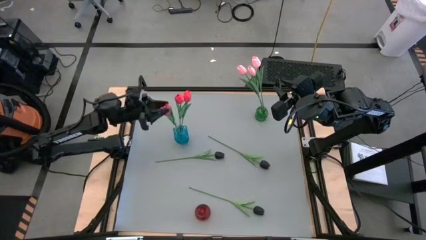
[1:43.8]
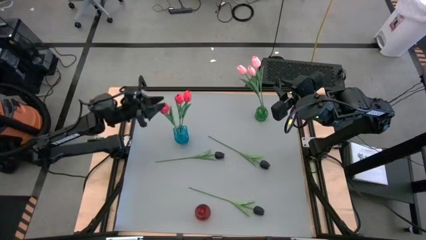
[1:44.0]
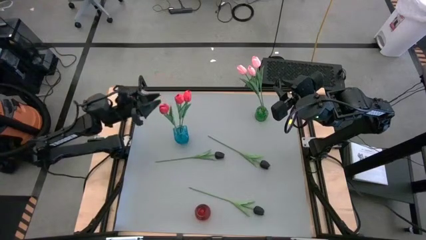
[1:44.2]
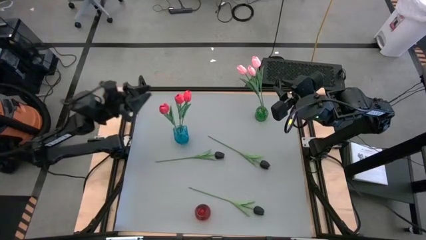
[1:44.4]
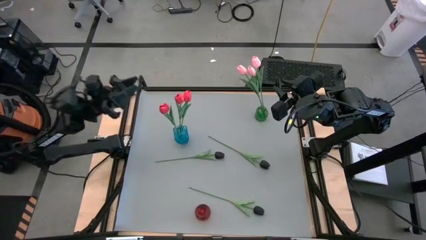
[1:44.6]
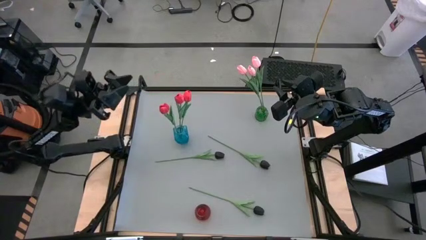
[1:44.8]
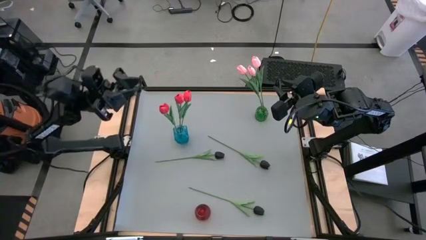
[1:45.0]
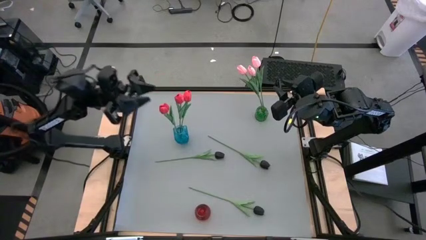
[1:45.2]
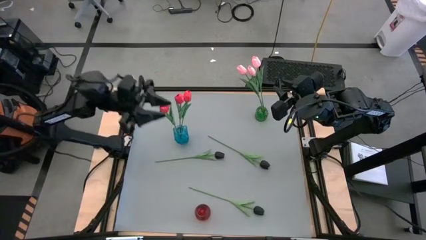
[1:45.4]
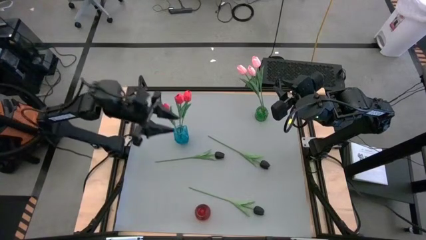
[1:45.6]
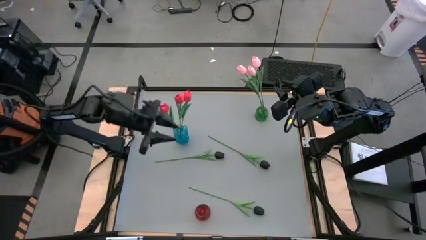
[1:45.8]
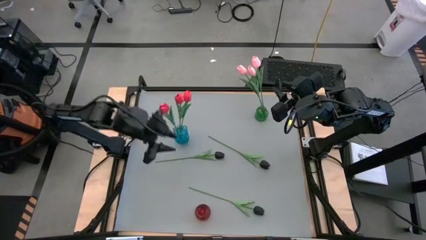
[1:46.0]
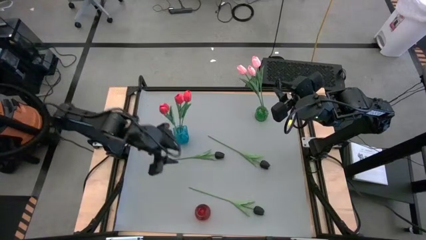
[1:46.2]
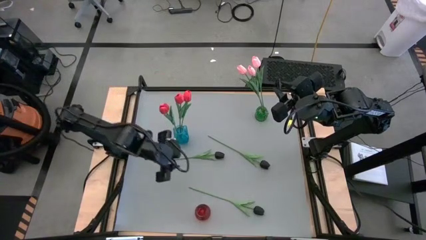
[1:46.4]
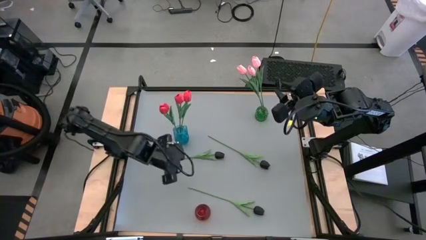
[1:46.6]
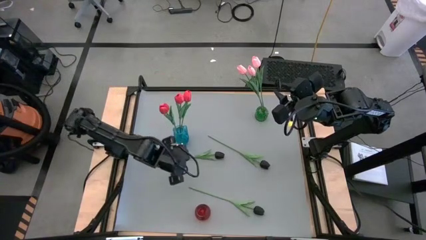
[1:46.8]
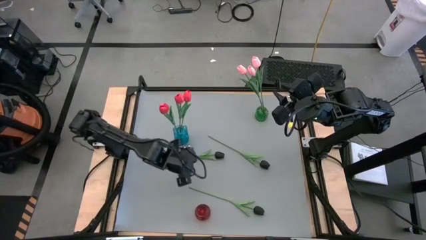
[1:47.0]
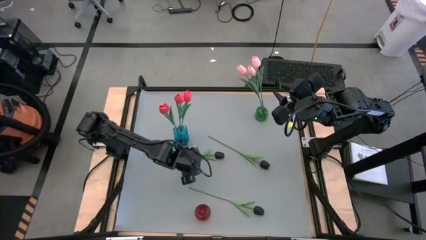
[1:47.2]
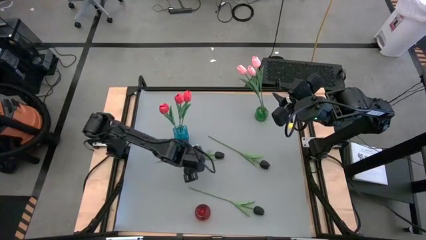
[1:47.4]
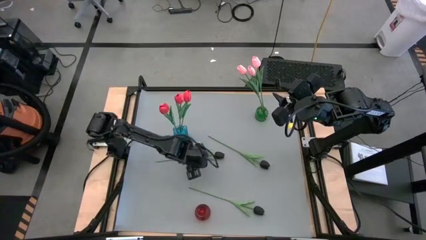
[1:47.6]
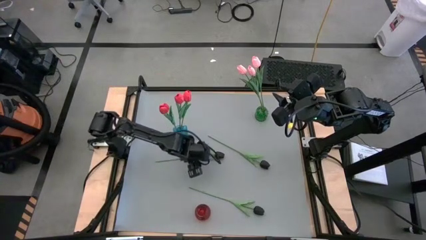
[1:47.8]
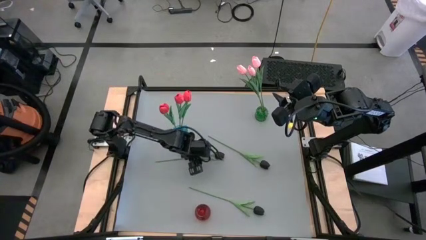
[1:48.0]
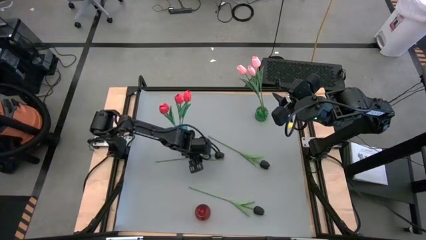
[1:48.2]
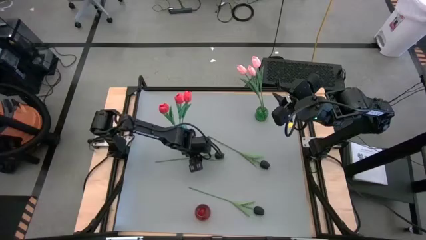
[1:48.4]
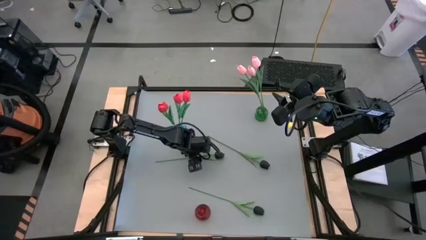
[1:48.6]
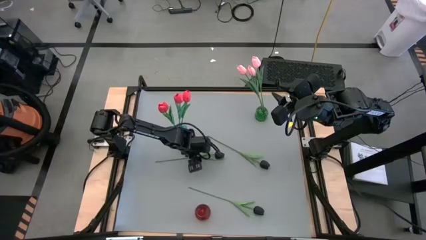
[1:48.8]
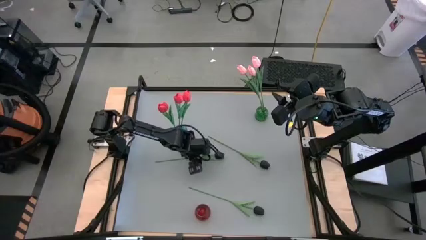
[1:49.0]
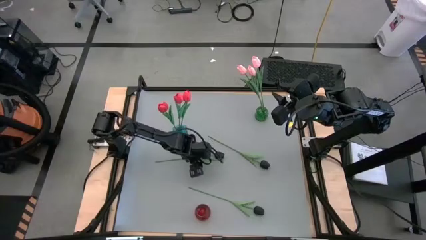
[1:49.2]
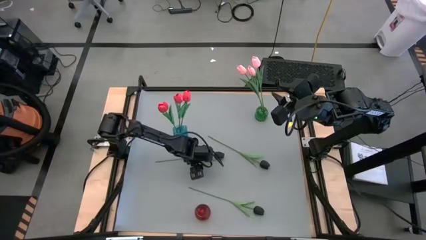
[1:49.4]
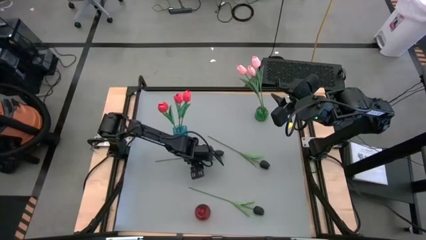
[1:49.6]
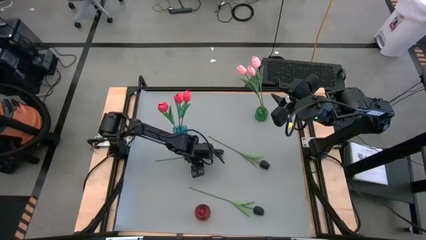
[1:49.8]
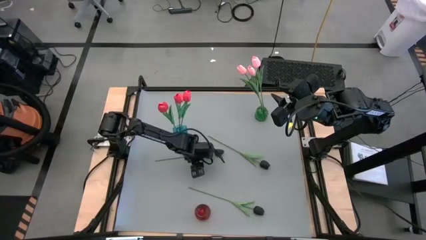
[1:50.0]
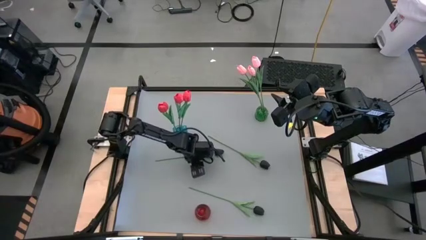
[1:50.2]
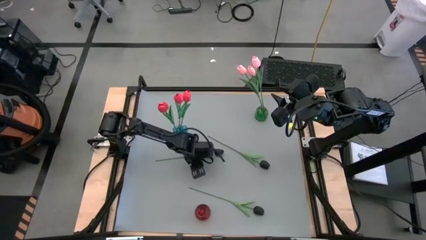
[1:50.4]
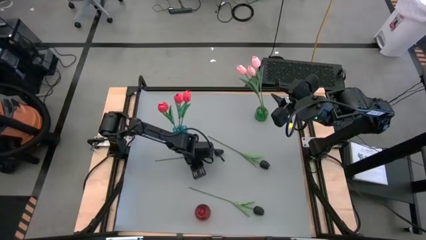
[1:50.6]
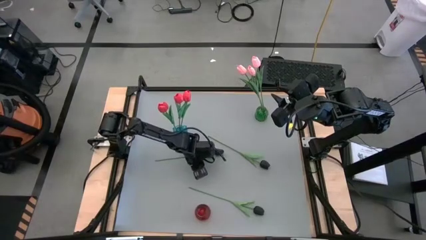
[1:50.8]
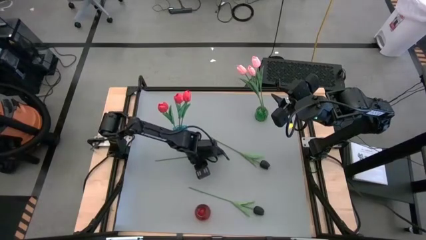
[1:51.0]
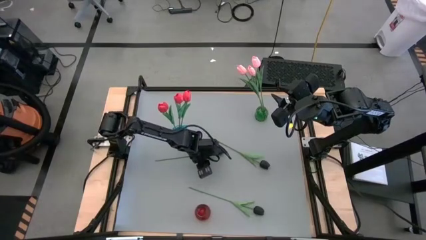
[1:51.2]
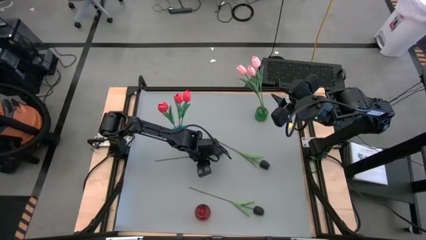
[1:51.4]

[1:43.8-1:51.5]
Task: Sort flowers into vase by color
Put the top left black flower into the red vase

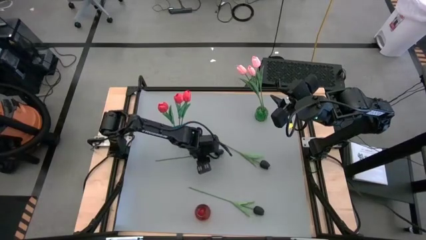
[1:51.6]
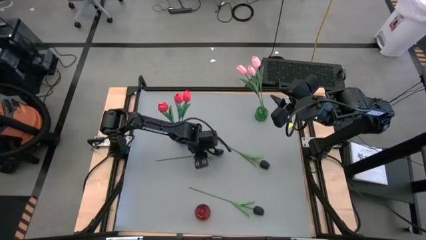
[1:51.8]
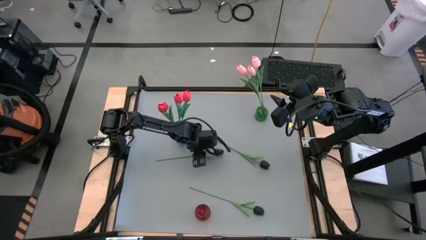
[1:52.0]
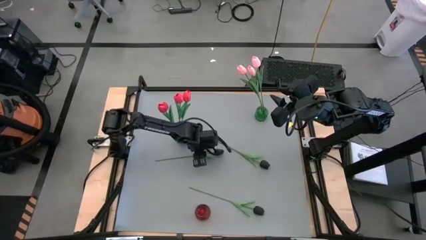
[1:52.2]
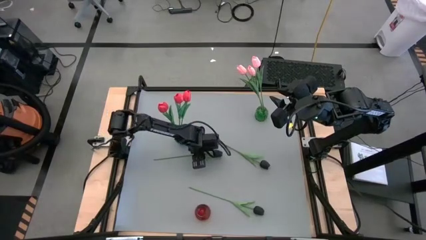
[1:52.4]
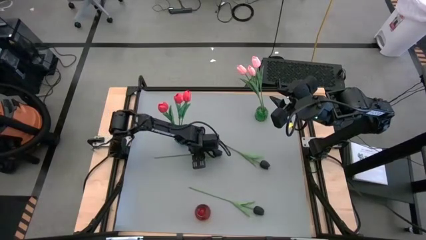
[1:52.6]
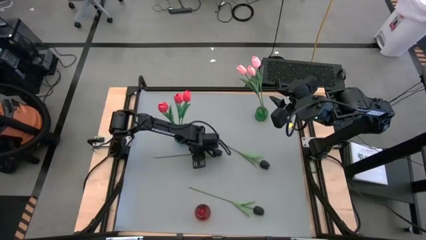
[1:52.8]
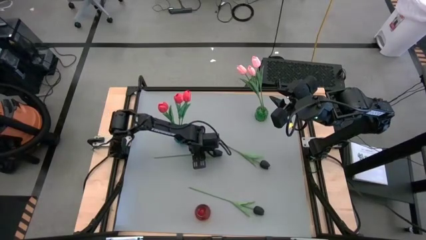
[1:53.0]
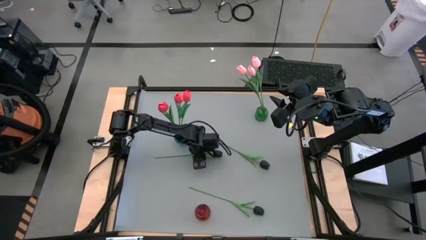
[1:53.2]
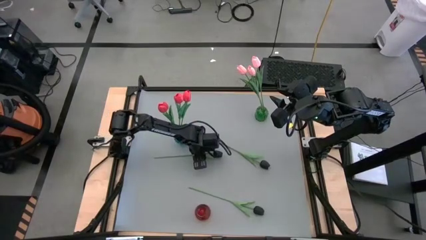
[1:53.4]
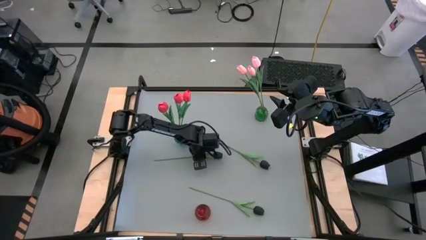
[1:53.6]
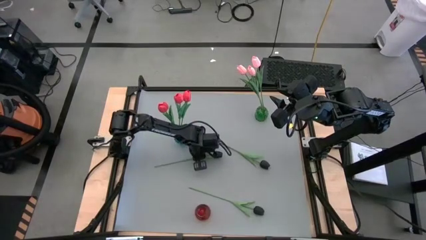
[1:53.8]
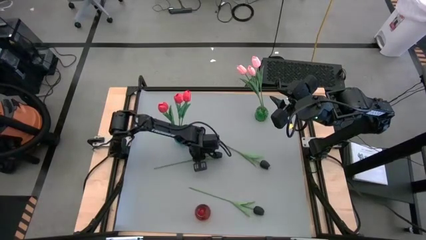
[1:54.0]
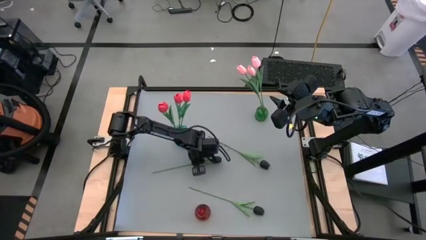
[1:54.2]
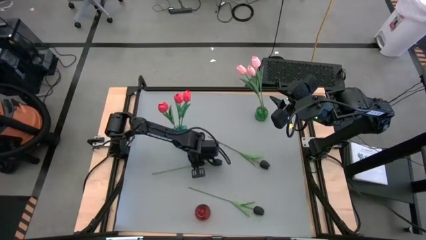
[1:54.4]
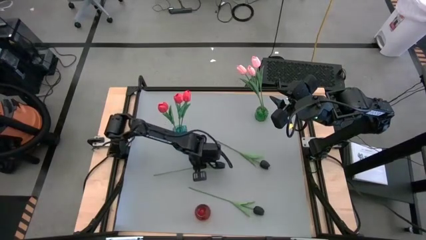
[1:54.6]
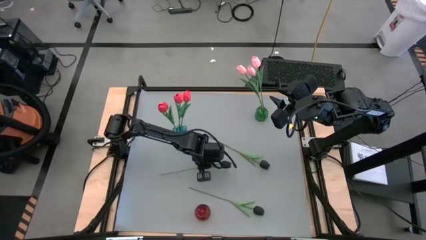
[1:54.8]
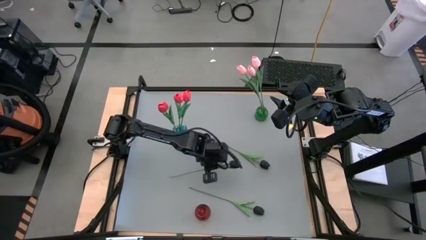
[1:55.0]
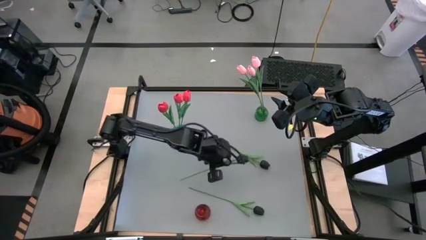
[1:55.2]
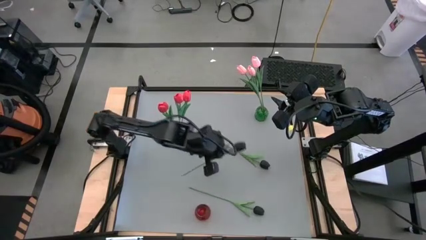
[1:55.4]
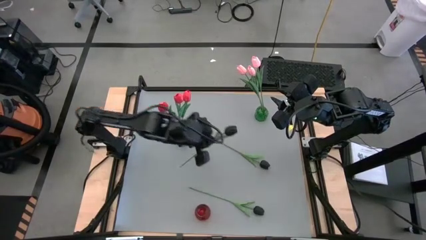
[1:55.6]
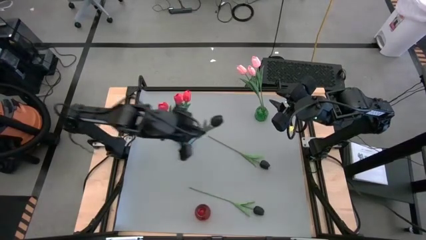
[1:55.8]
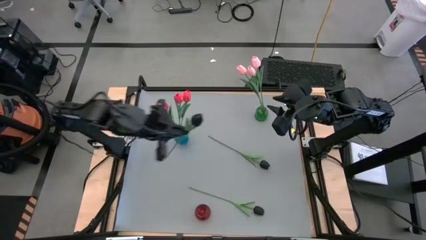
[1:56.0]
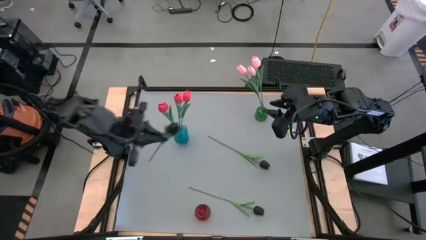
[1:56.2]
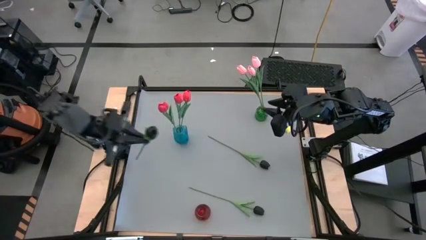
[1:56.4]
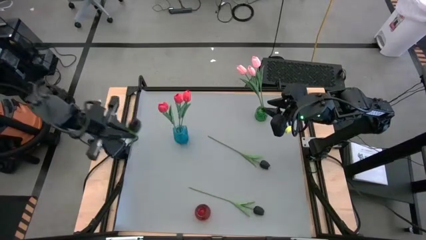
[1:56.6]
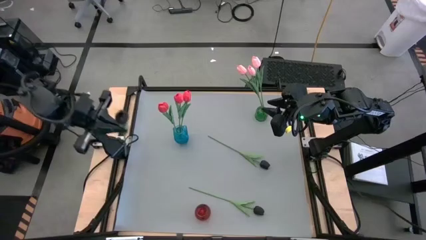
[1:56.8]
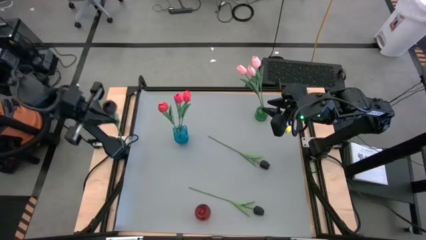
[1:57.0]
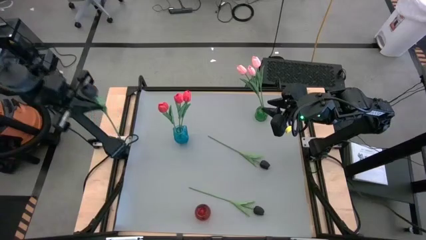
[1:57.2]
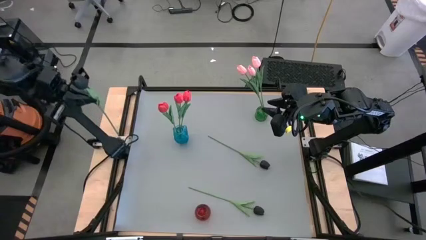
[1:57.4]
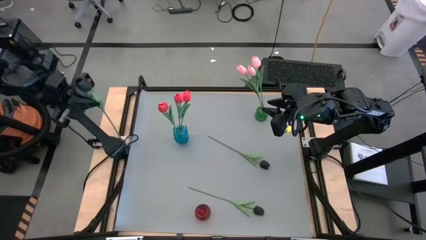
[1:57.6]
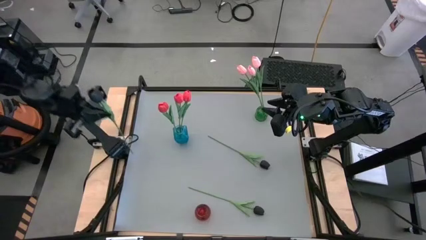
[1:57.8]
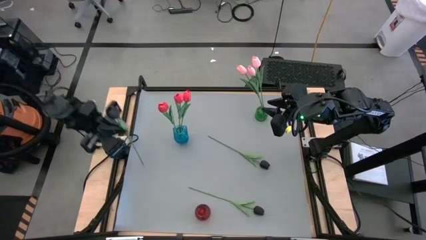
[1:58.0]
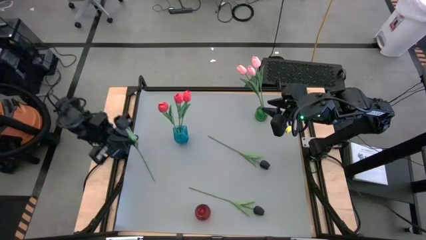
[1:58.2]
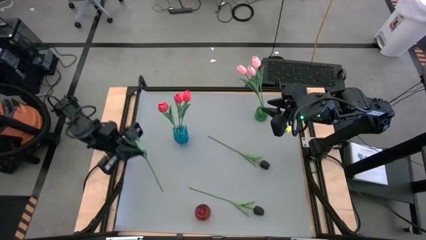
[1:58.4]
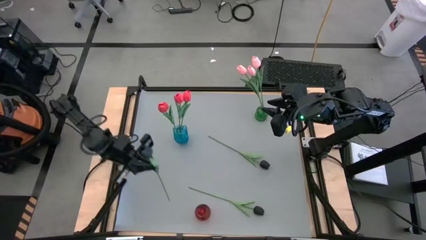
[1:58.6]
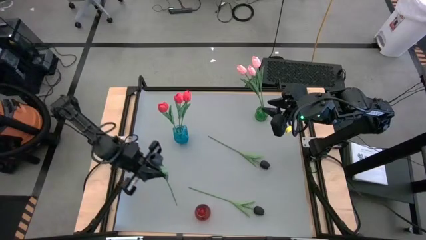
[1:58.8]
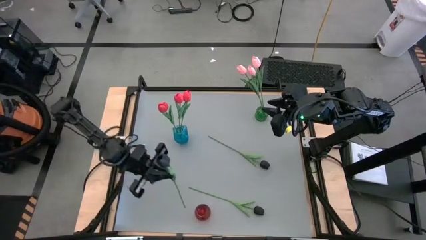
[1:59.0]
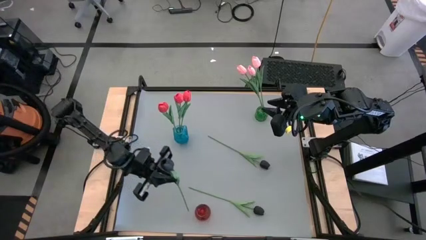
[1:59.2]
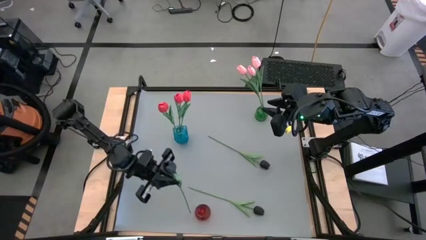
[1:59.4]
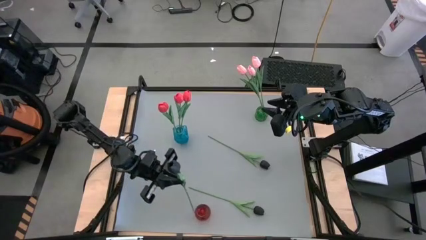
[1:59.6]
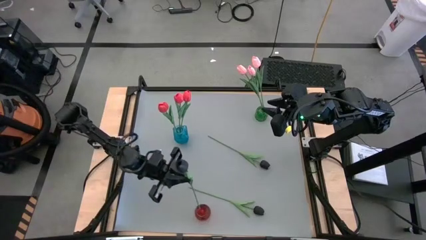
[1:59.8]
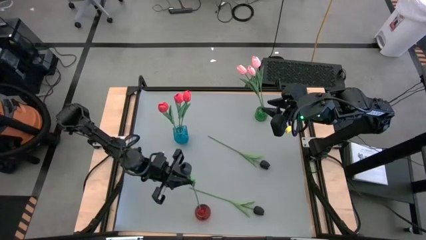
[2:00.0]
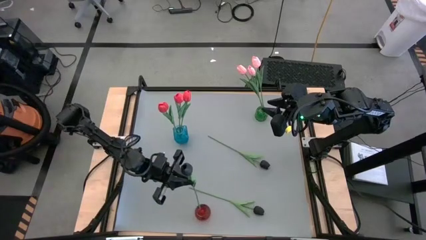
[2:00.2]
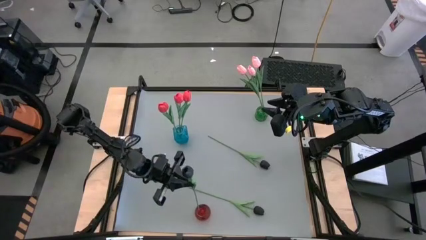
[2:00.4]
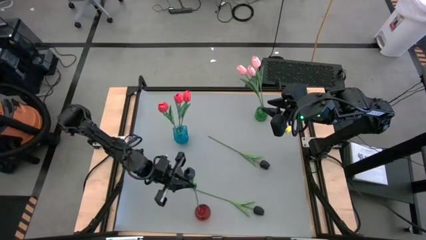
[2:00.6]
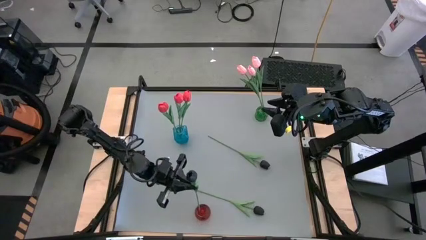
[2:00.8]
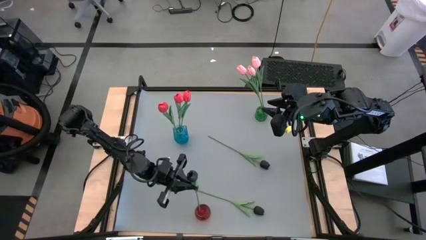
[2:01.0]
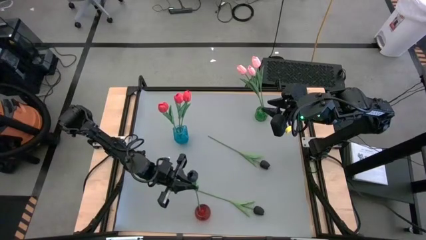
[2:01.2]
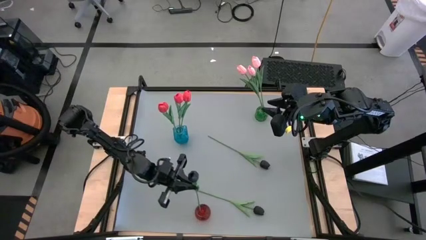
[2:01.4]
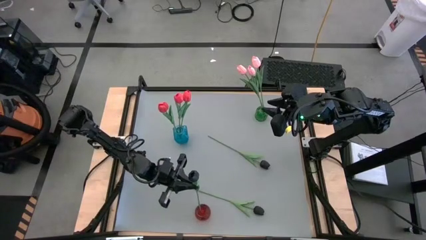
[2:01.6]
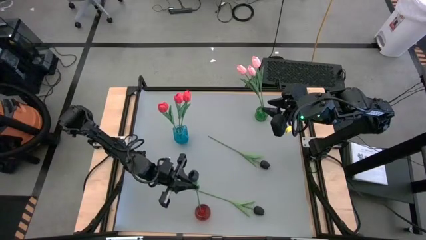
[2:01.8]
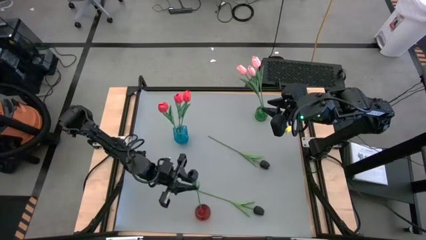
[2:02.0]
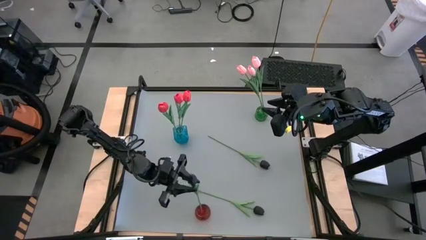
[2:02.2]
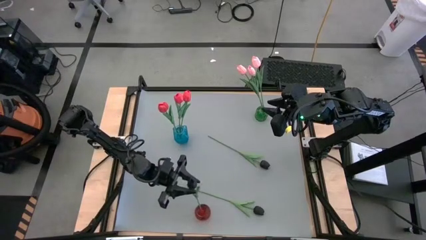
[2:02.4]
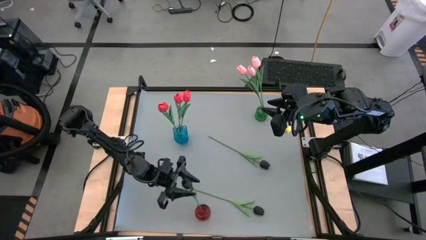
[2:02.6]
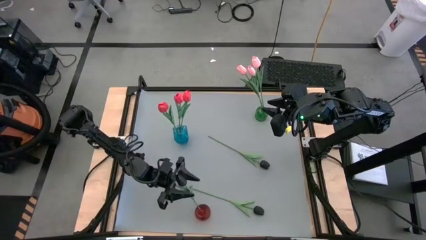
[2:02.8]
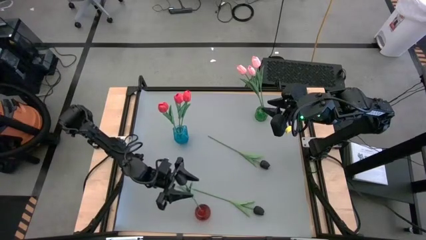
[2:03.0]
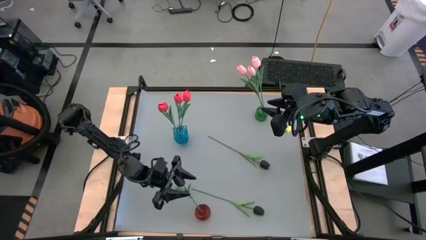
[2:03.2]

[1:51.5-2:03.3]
Put the top left black flower into the red vase
